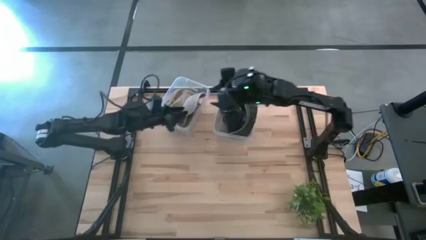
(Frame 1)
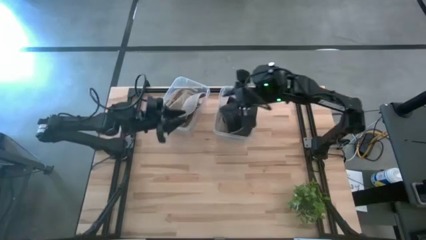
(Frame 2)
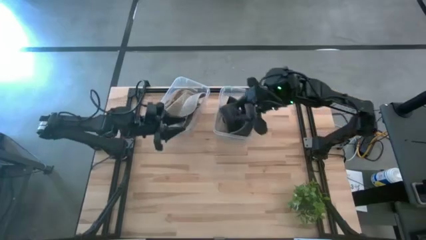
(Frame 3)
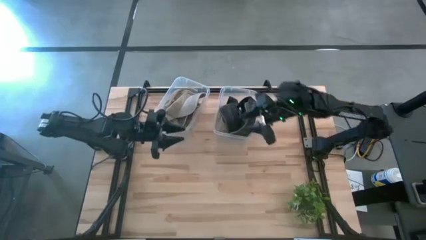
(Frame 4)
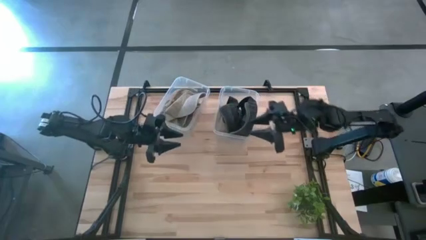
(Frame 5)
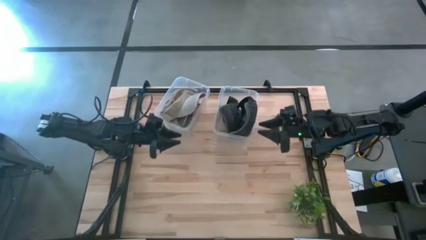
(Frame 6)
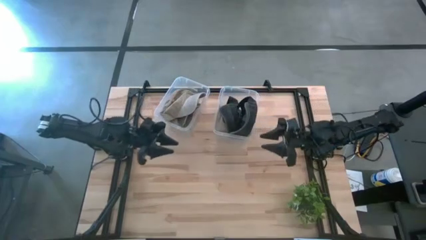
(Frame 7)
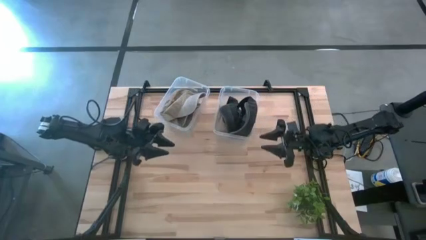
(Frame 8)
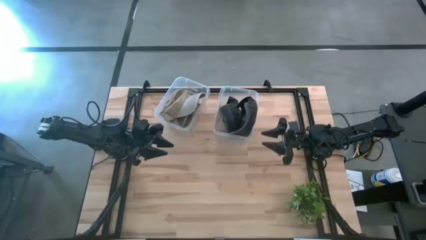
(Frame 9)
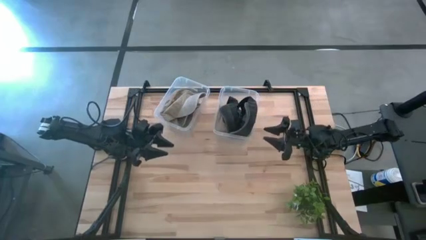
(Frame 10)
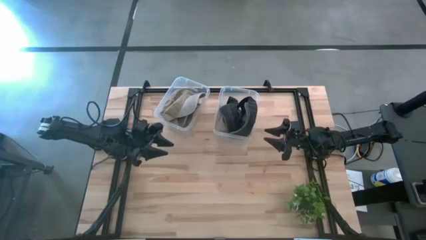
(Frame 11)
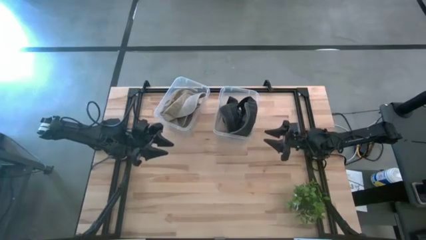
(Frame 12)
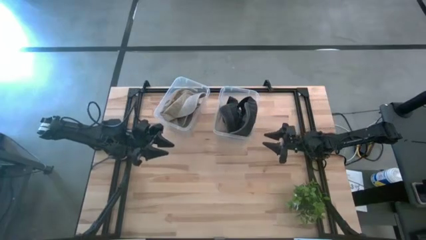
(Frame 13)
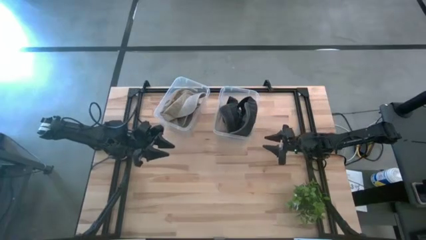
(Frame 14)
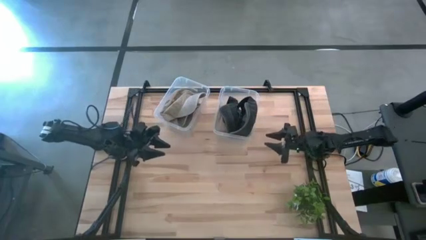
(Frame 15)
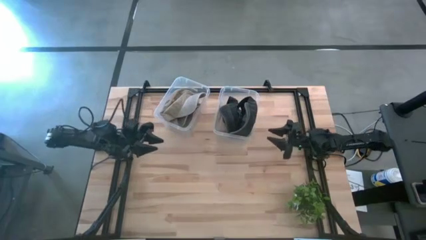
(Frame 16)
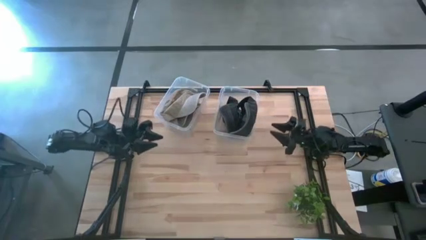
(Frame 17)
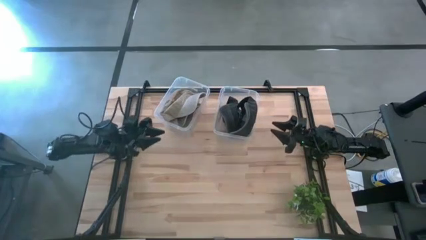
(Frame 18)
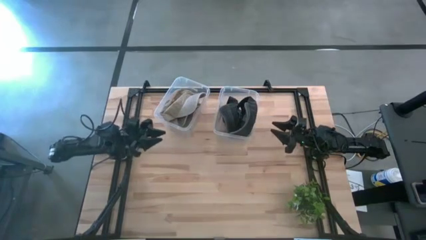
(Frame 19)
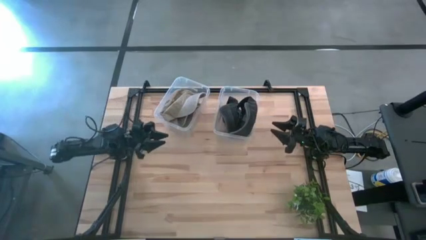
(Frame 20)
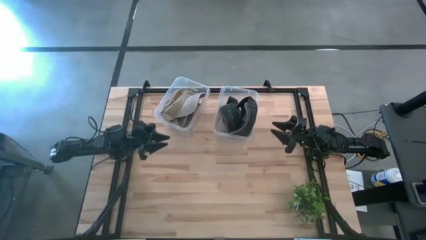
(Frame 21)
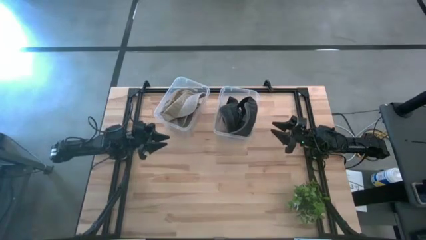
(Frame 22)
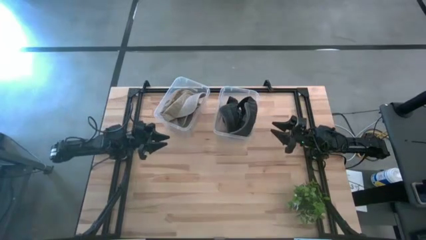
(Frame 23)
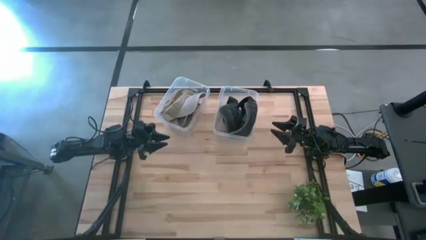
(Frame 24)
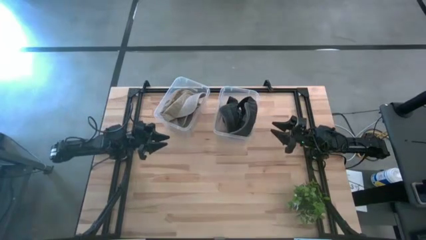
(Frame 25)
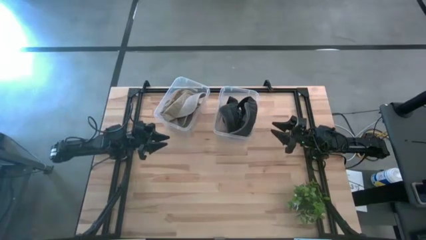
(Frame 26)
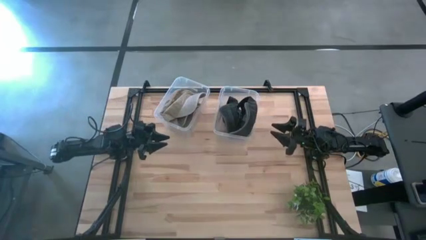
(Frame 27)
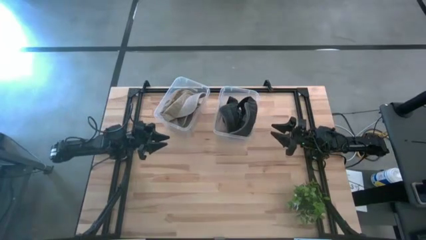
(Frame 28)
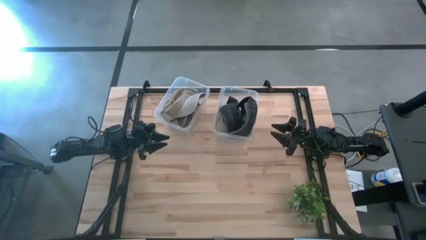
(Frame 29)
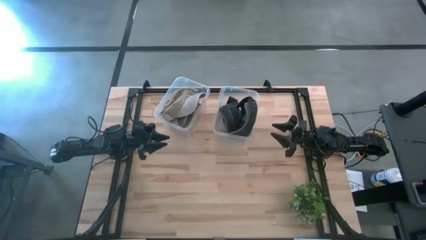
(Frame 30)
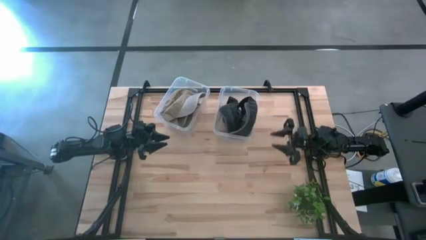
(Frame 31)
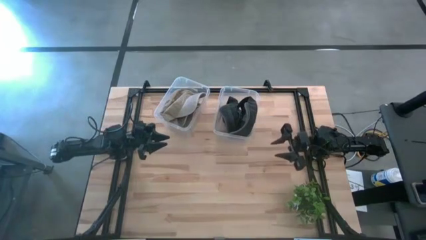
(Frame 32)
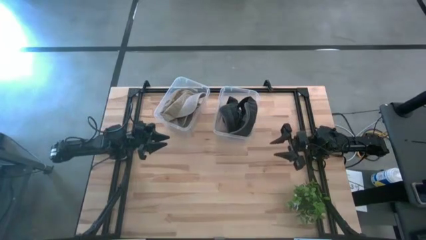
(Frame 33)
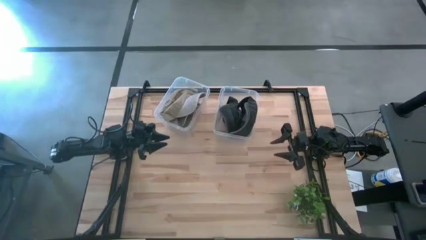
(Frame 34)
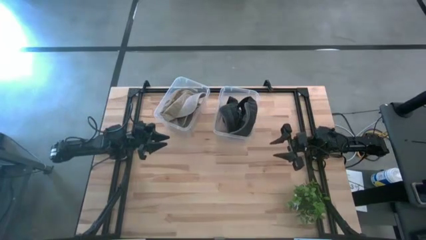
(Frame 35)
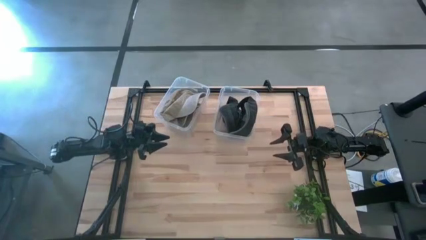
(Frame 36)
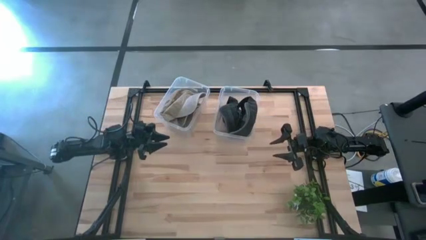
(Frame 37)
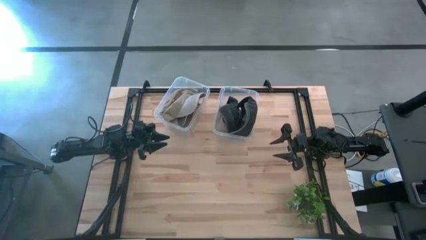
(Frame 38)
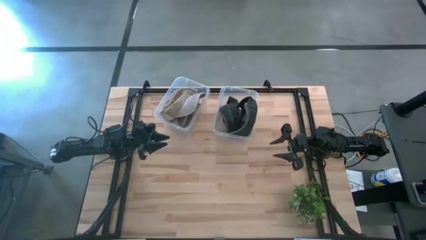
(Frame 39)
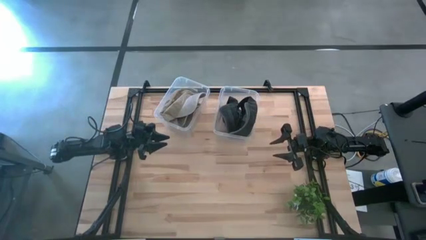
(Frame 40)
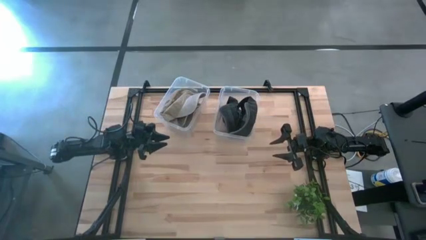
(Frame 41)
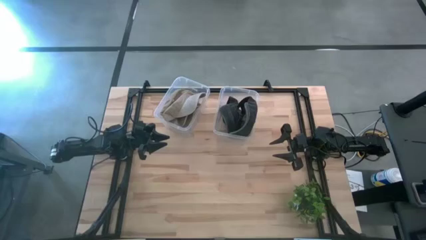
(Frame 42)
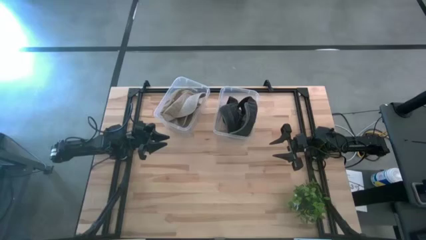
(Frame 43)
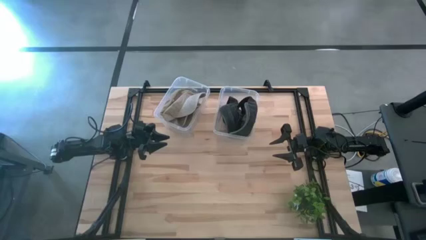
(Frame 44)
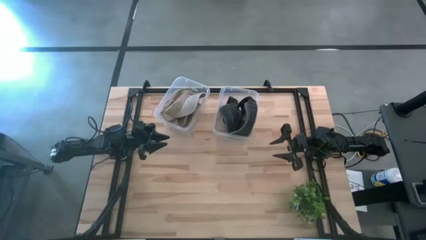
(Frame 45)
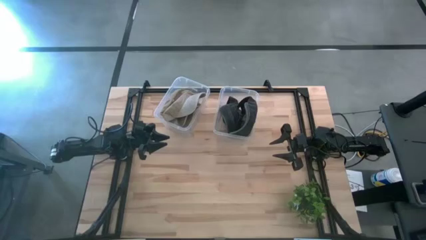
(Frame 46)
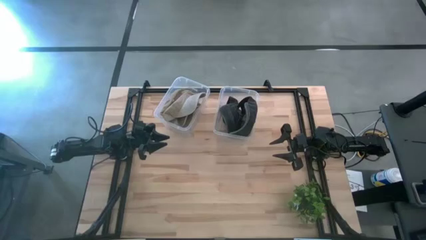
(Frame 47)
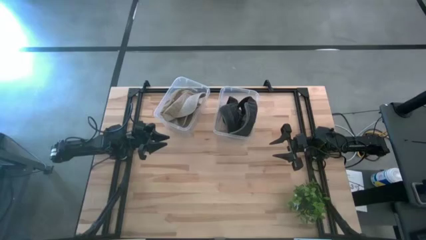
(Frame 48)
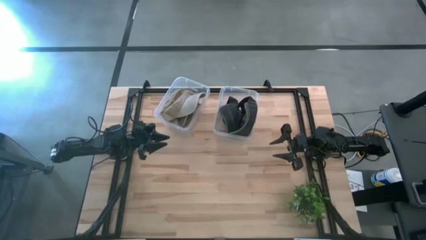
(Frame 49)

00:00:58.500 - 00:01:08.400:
Task: Pick & Place hat
Return to Home Position

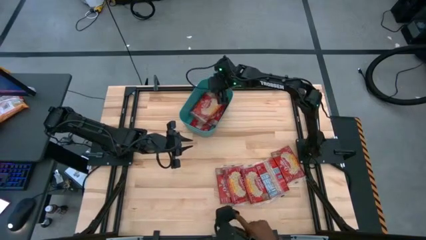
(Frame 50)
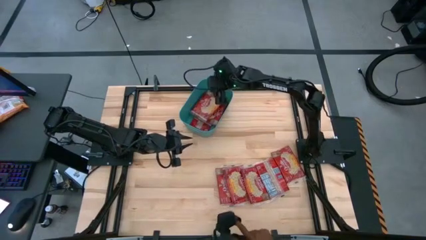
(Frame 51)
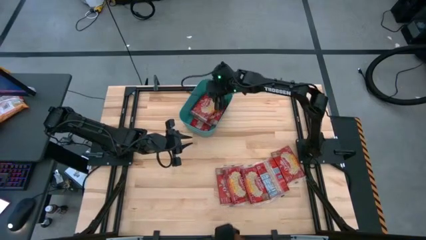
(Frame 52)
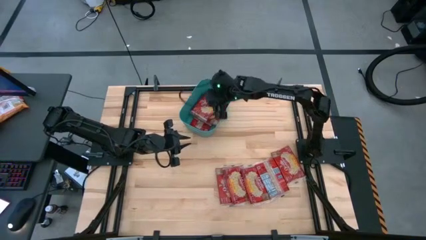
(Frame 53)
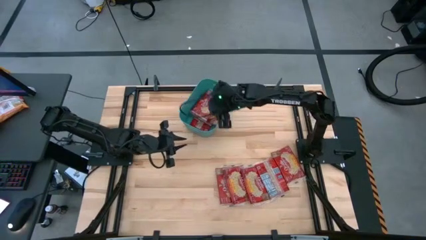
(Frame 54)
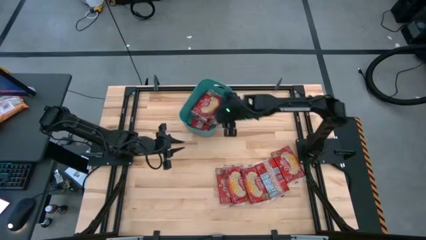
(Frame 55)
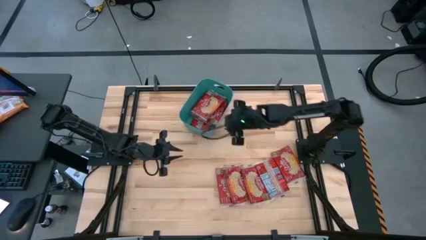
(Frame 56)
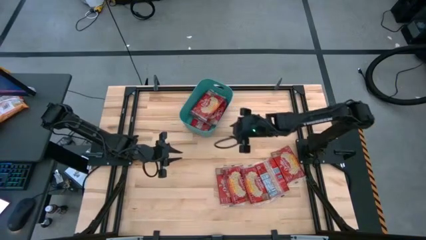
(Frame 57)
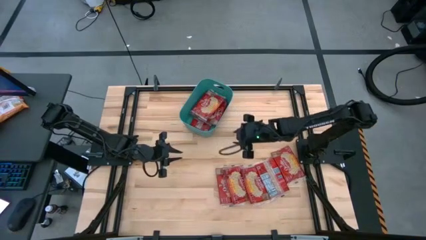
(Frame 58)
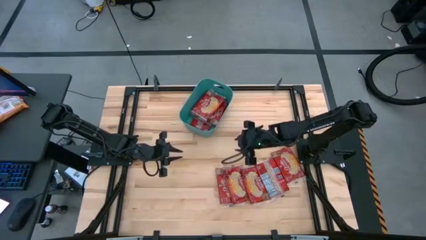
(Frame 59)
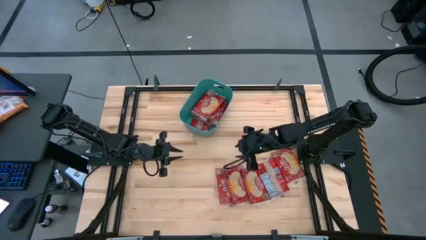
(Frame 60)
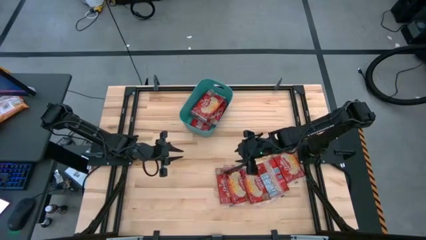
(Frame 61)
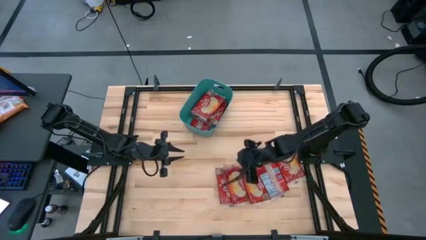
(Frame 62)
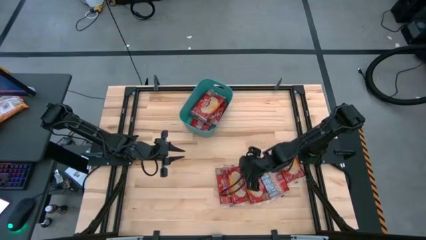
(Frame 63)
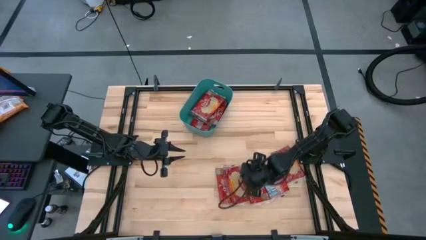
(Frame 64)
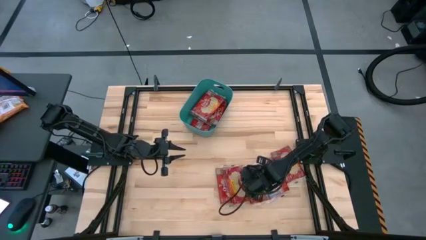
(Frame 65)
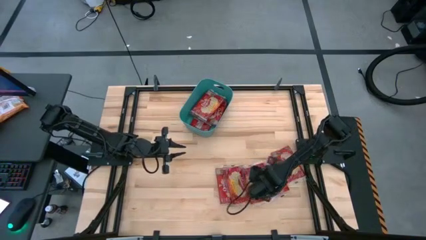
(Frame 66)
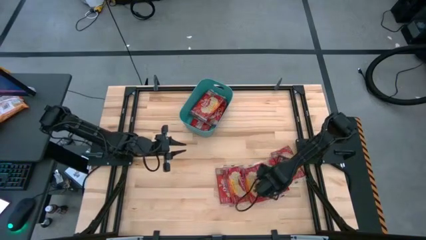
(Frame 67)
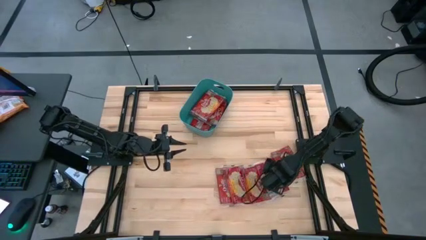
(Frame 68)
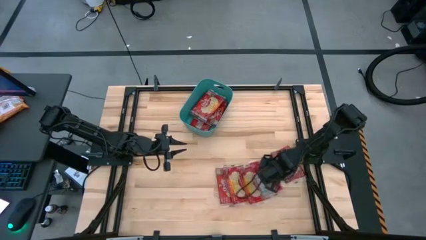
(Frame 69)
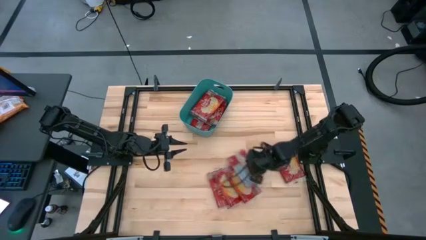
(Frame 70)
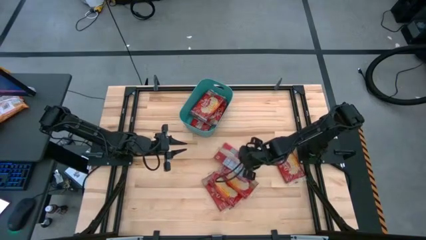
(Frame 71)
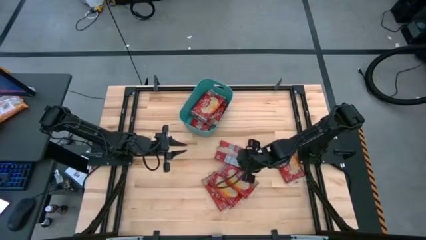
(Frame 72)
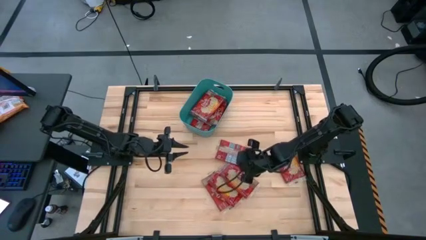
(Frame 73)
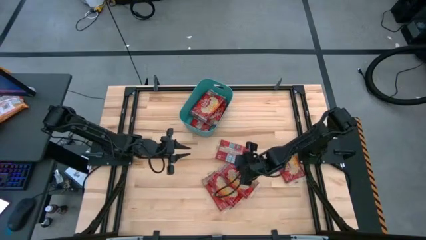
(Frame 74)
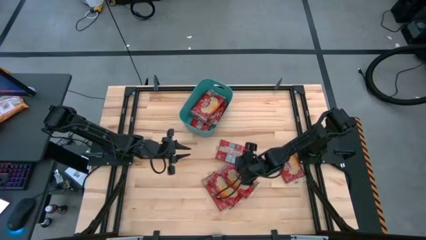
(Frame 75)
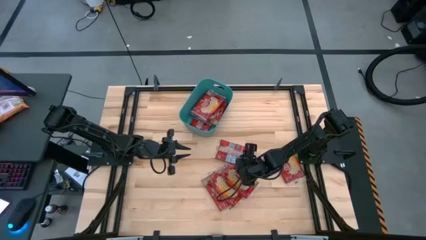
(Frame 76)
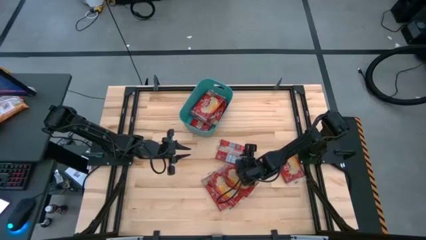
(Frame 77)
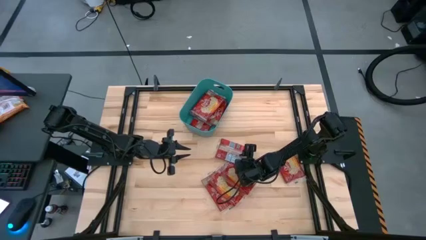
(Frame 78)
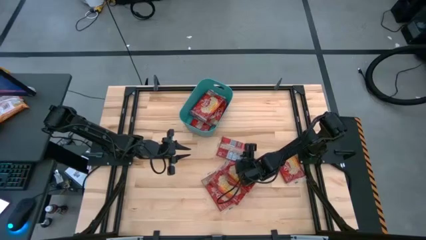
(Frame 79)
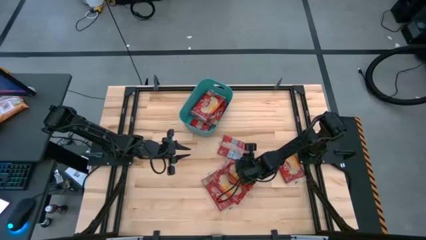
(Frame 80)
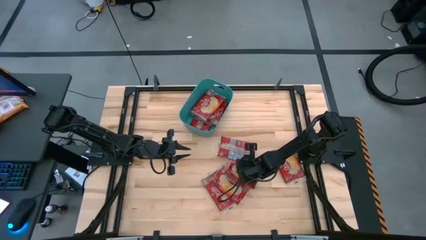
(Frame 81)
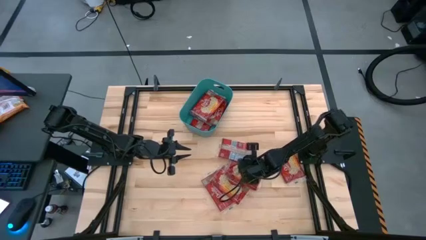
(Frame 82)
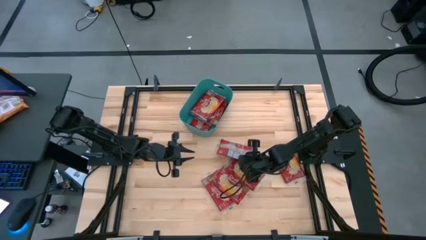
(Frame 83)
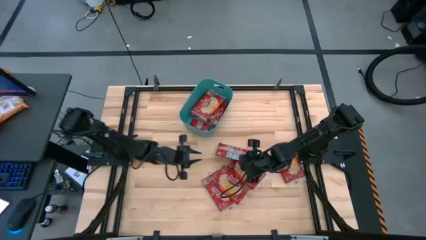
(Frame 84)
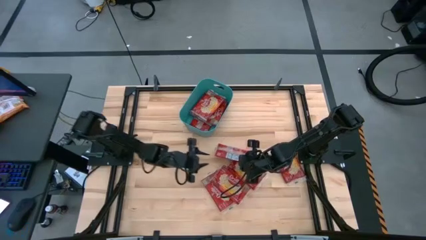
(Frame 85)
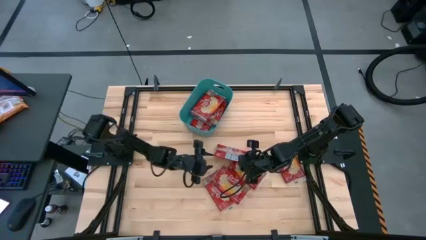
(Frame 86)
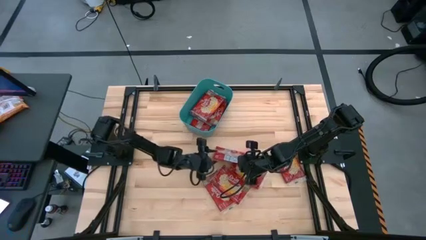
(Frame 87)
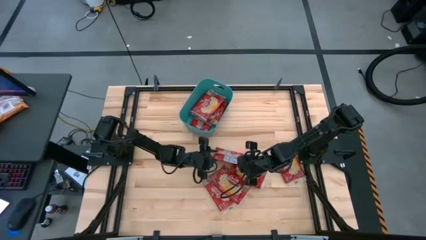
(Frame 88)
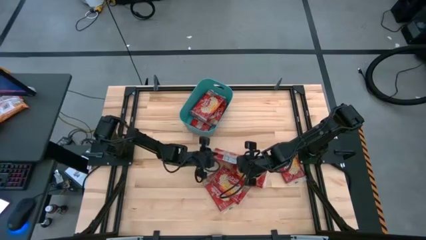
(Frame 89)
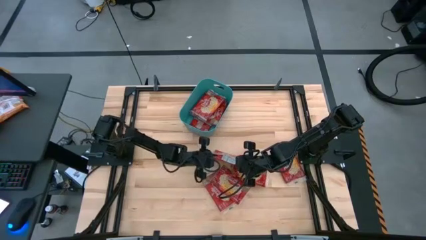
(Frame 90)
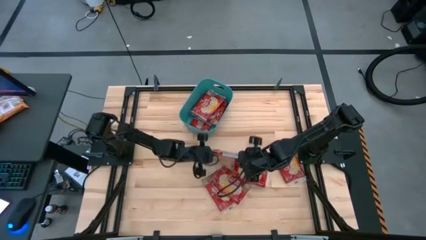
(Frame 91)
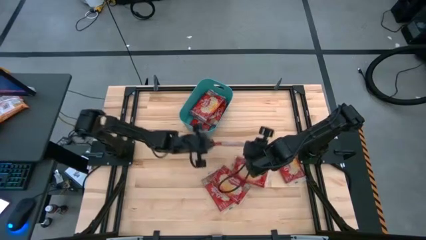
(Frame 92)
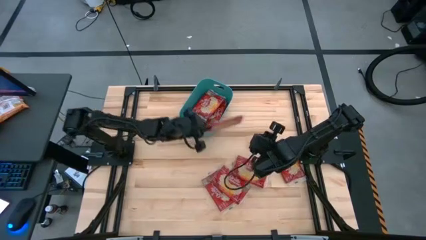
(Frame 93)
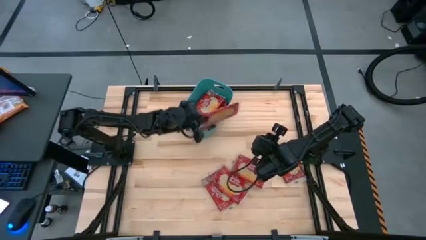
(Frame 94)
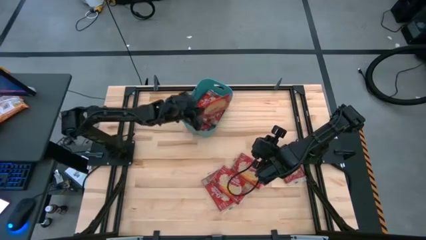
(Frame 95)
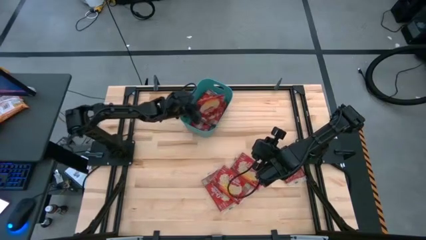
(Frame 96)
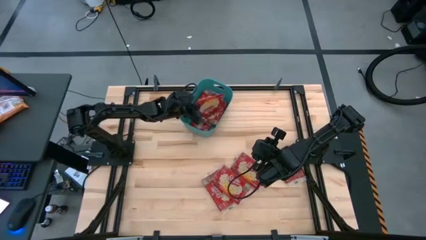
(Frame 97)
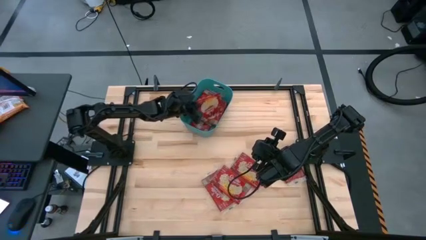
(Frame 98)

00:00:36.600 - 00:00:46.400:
Task: Sort popcorn bags into baskets
Put the popcorn bag into the green bin
